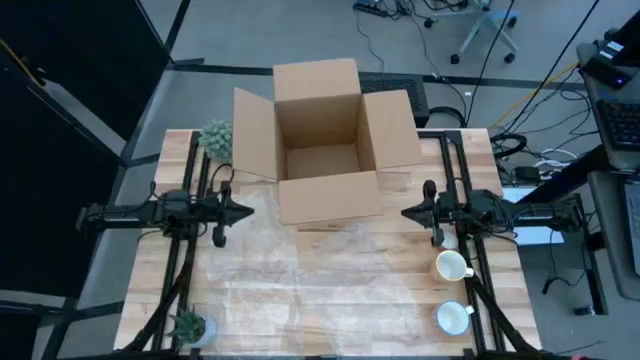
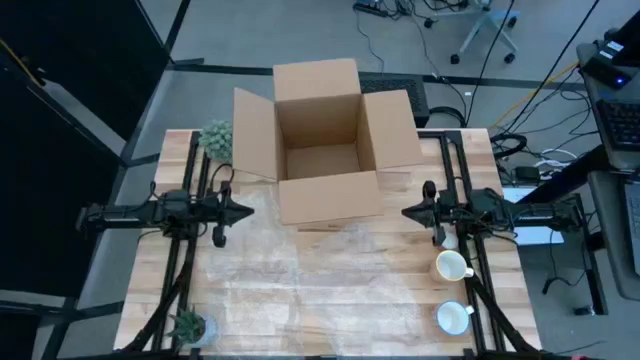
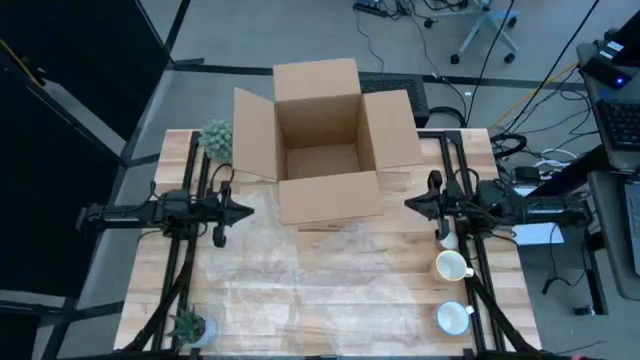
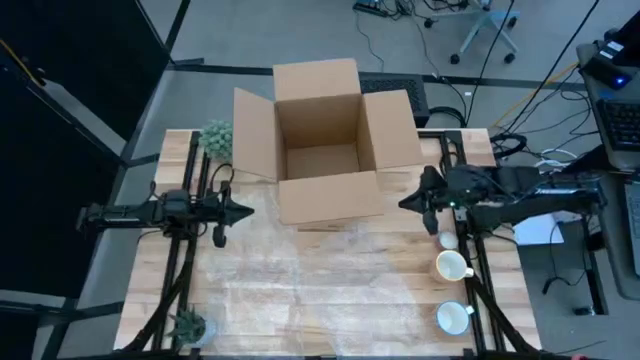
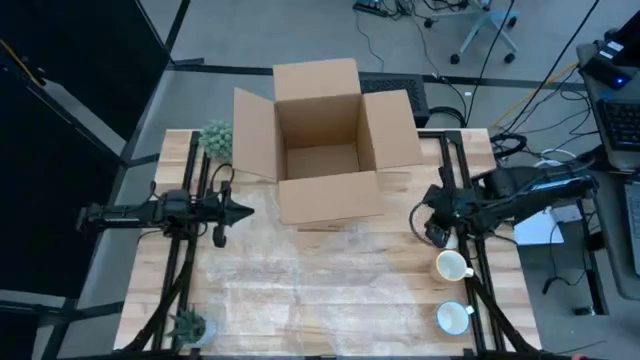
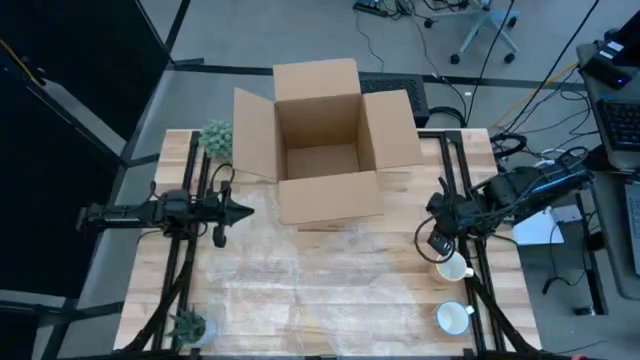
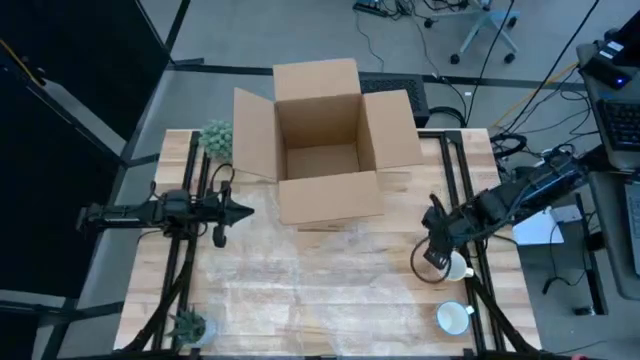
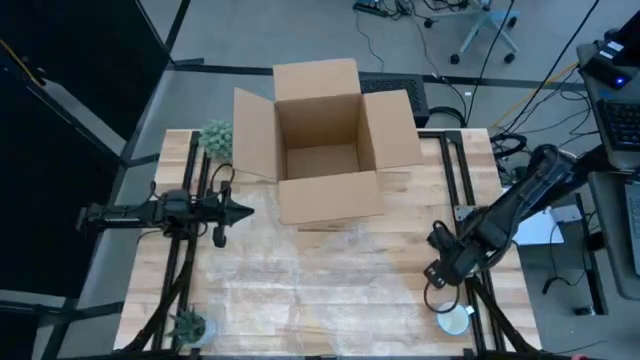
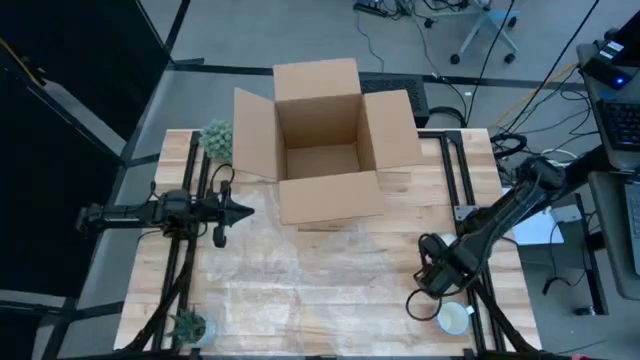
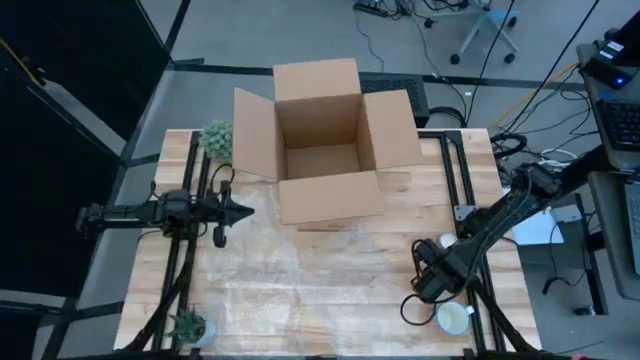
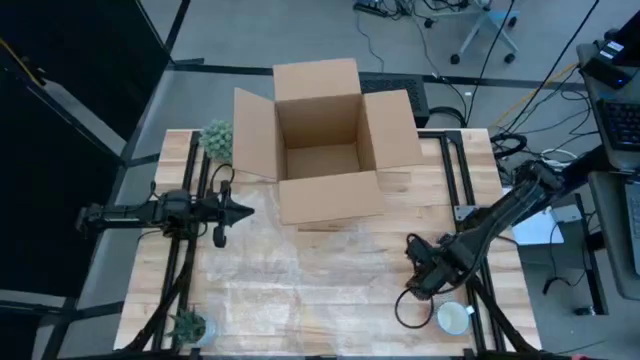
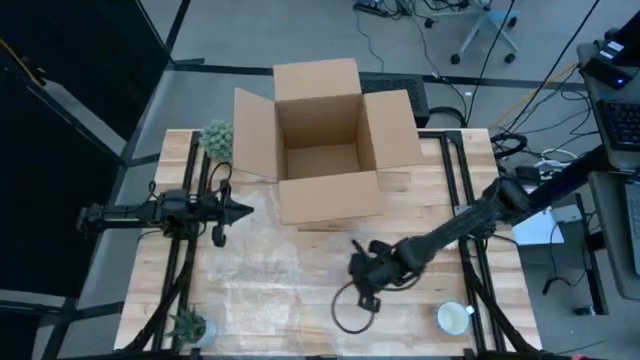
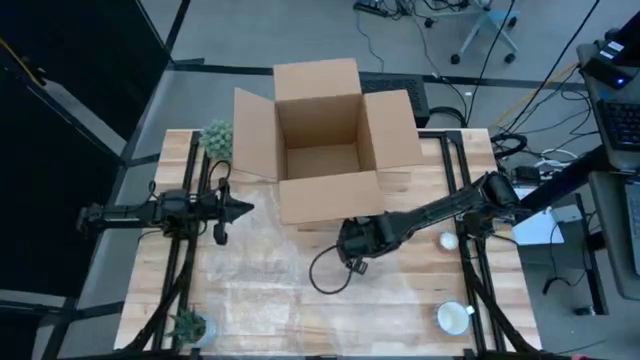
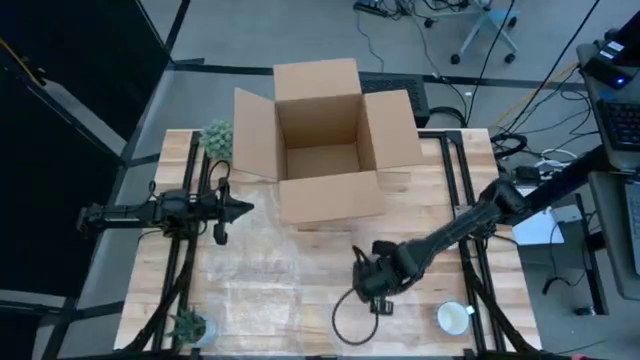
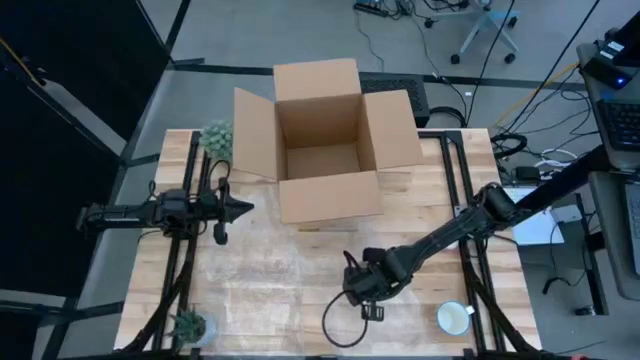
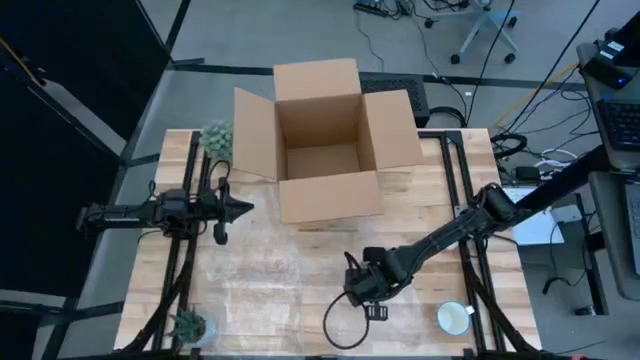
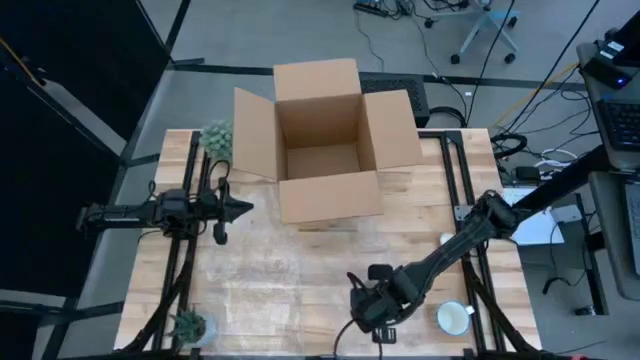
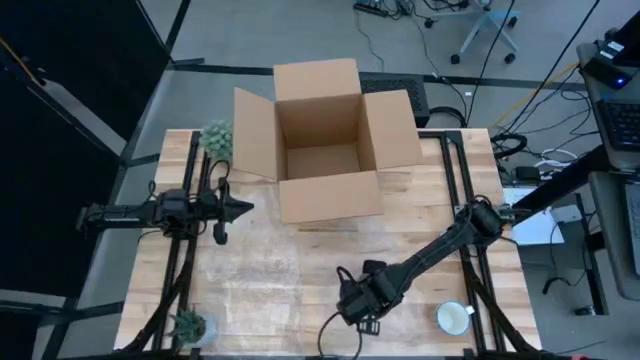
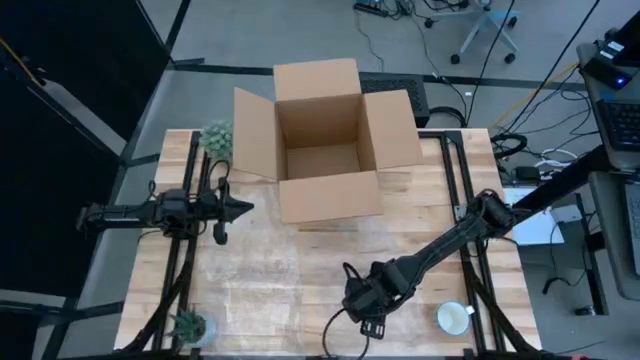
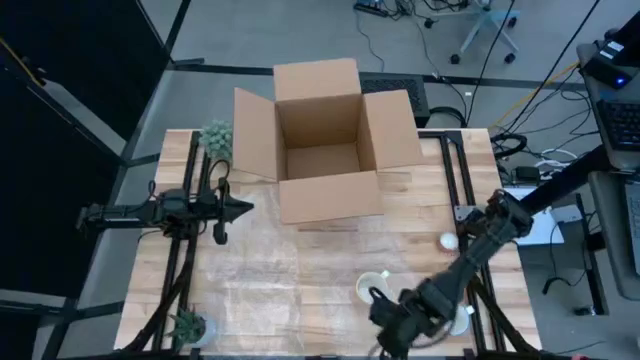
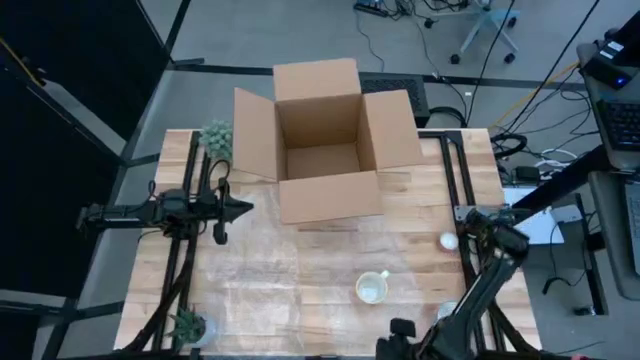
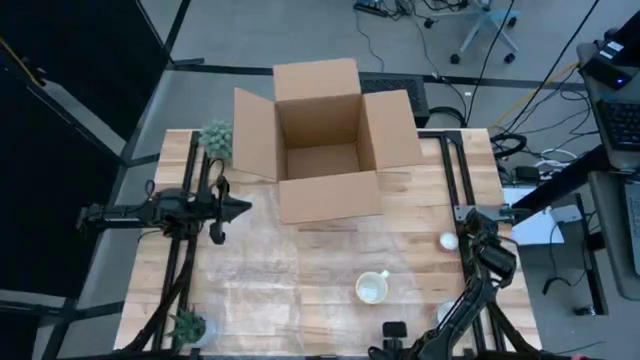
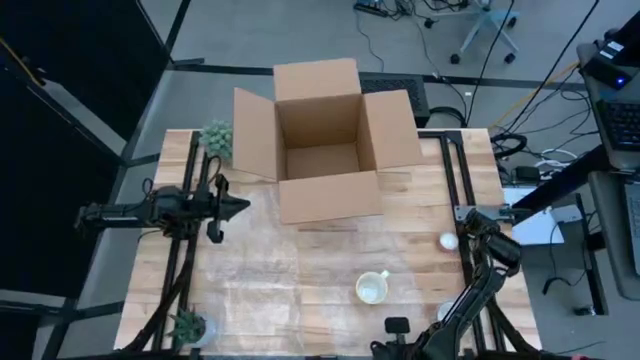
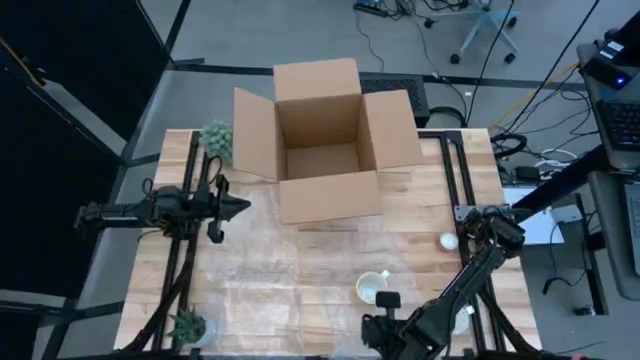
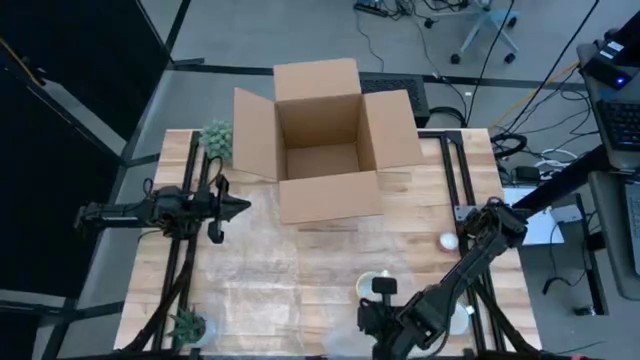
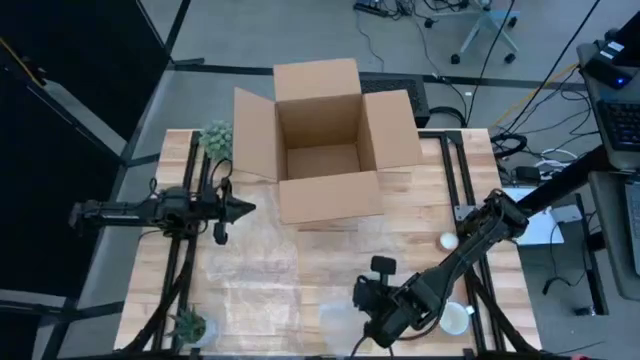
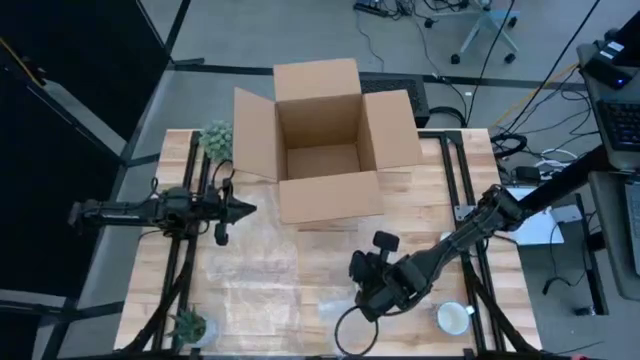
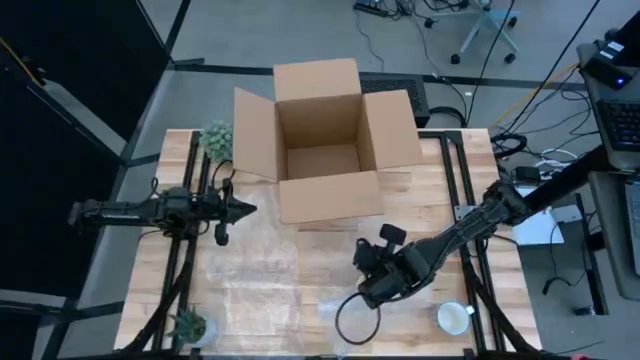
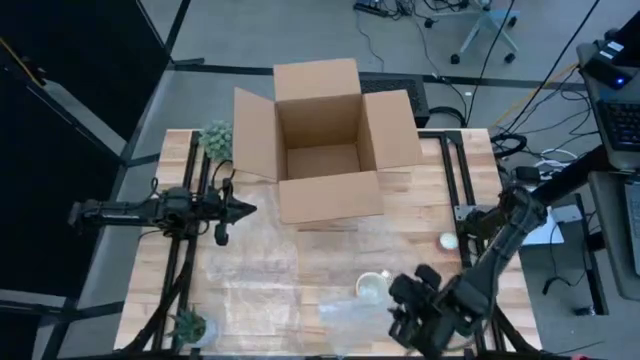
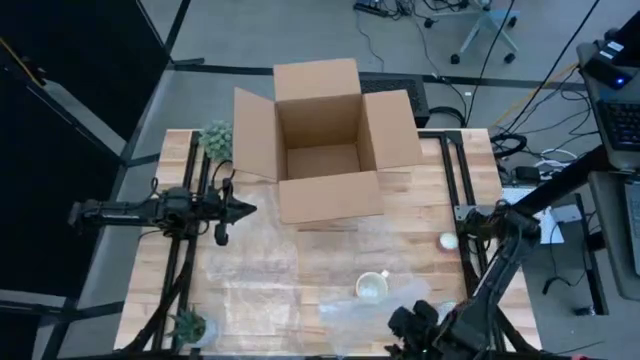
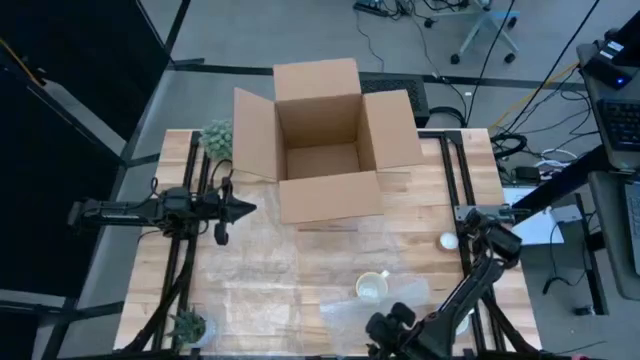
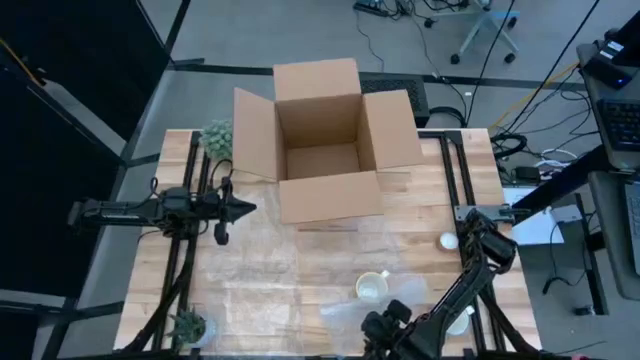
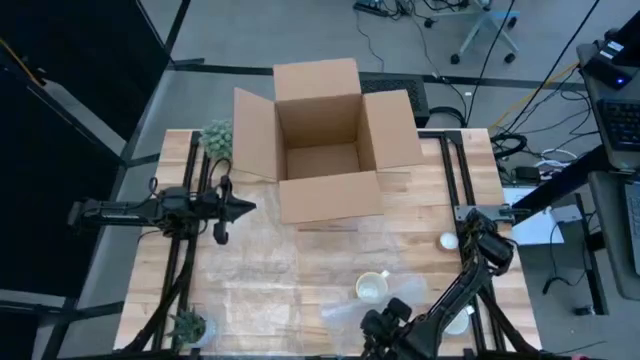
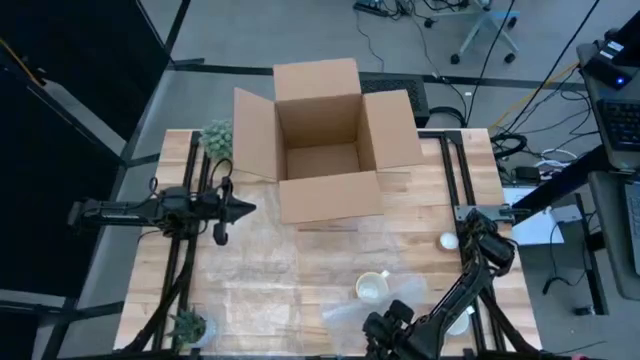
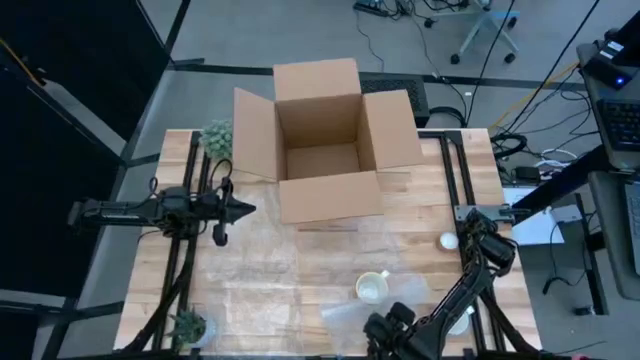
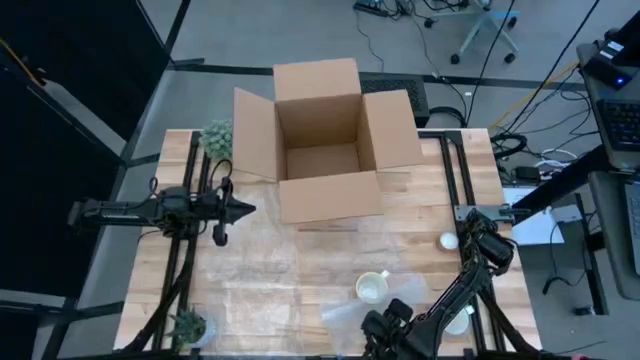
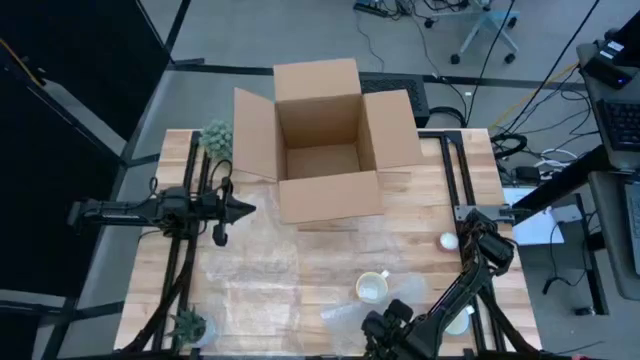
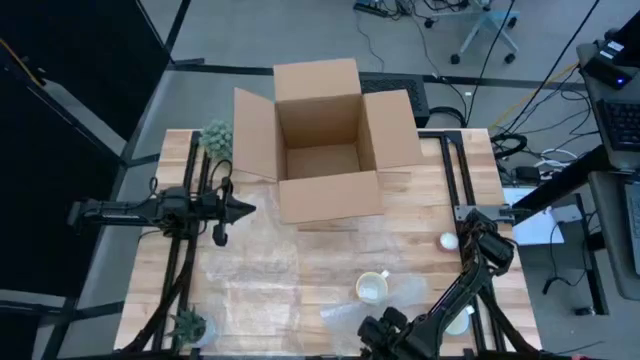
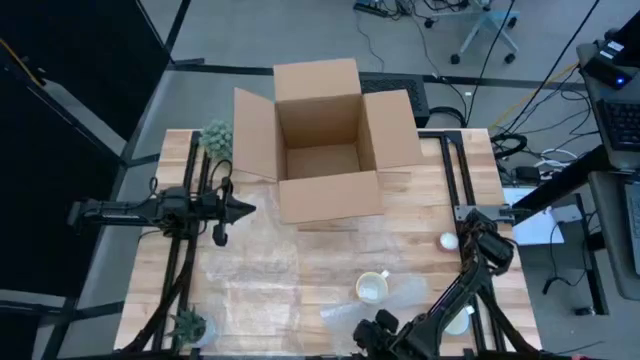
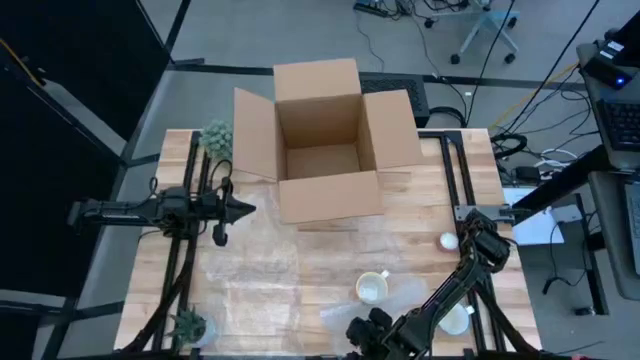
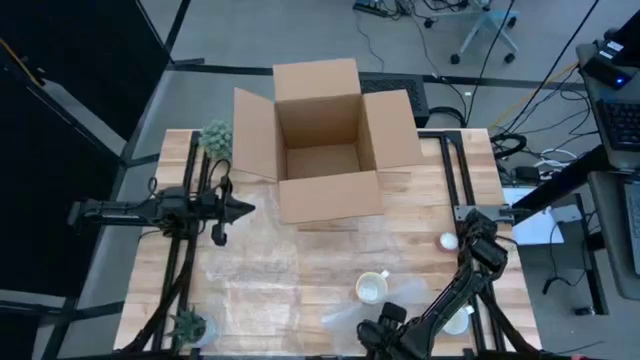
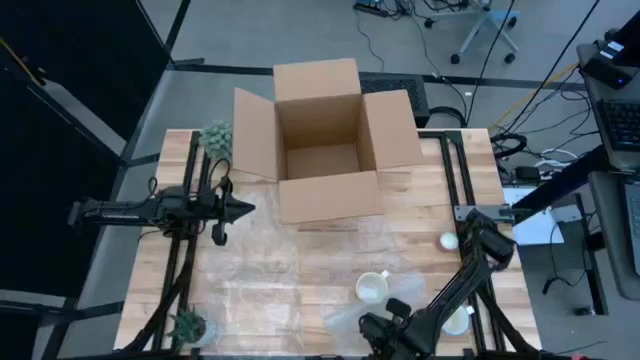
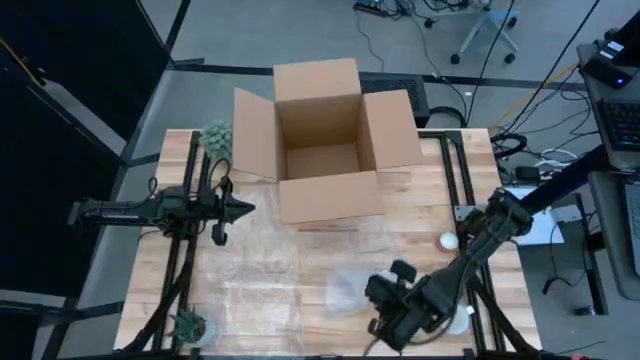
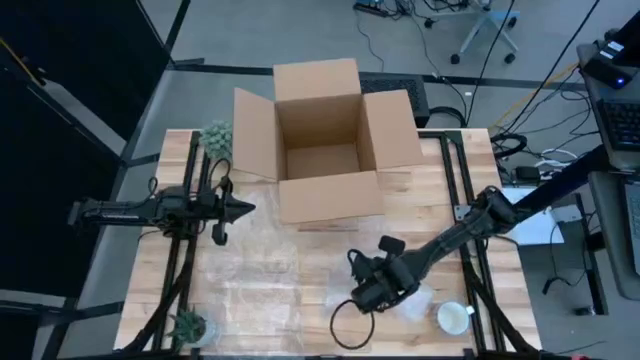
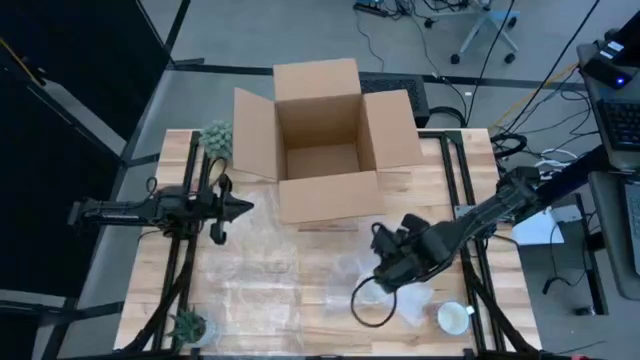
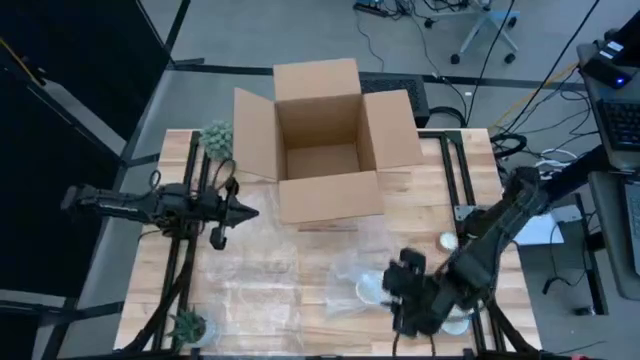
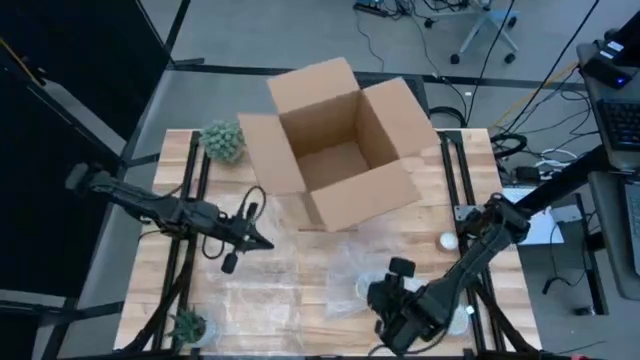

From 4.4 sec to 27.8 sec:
Task: wrap mug
Wrap the orange mug with bubble wrap
